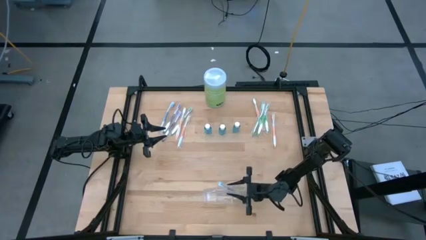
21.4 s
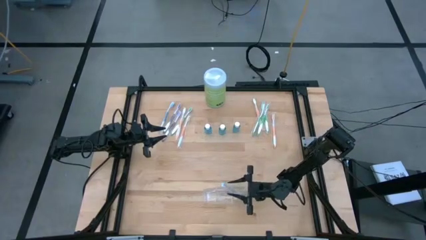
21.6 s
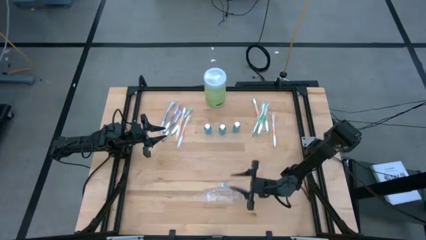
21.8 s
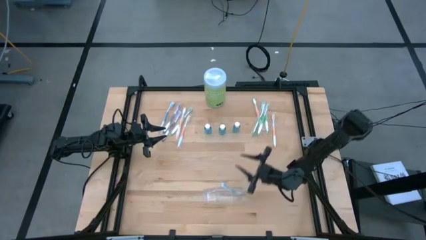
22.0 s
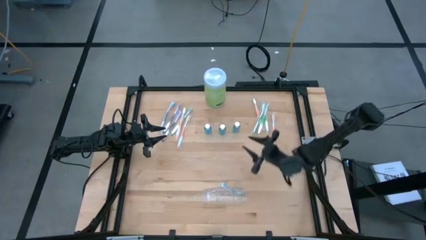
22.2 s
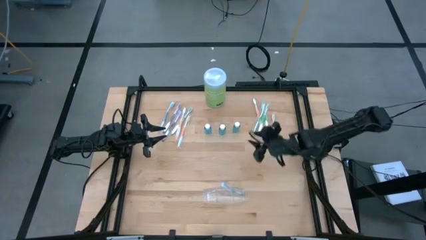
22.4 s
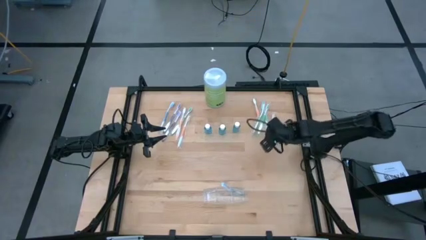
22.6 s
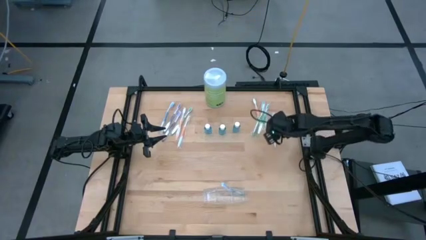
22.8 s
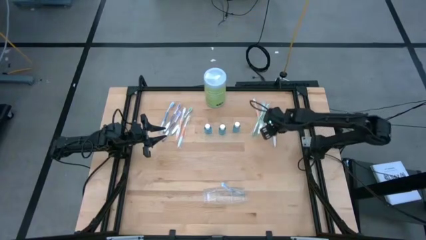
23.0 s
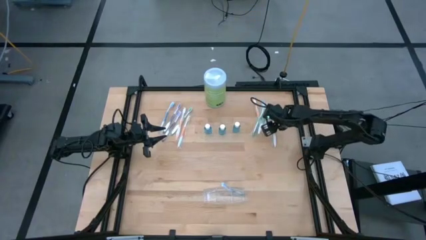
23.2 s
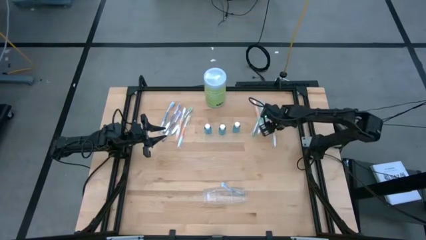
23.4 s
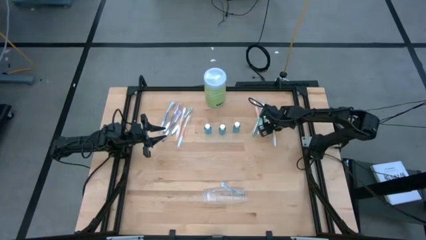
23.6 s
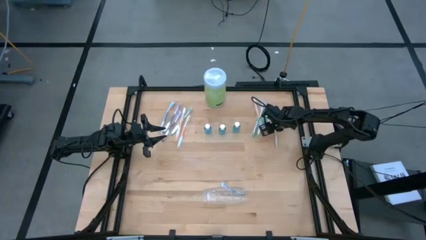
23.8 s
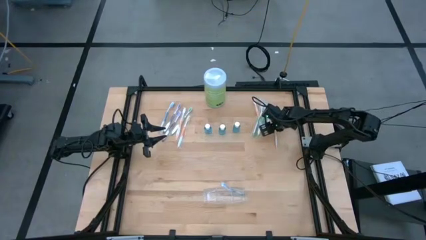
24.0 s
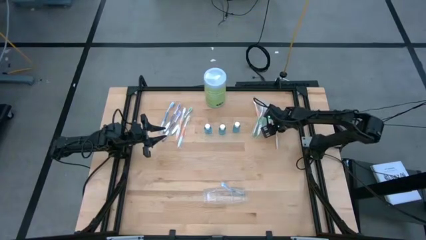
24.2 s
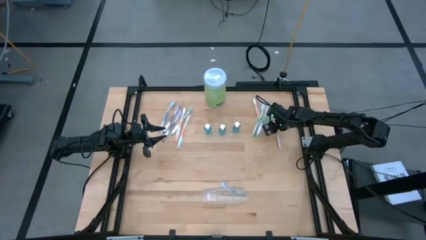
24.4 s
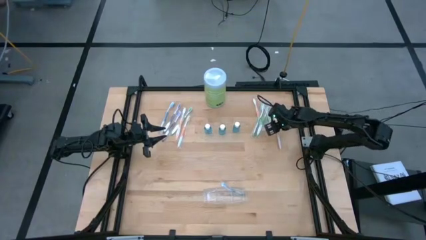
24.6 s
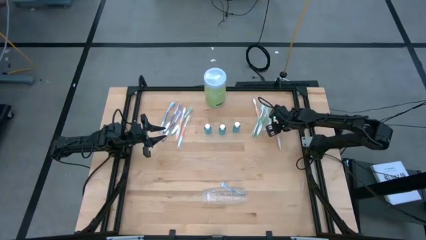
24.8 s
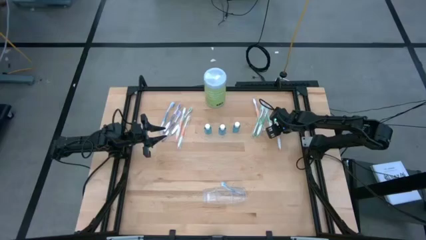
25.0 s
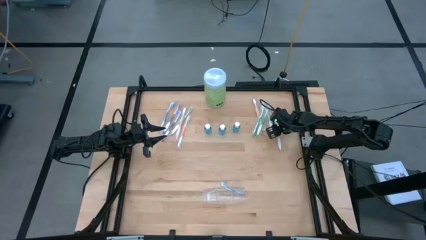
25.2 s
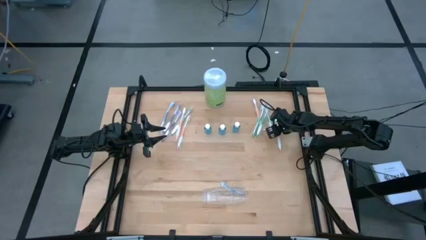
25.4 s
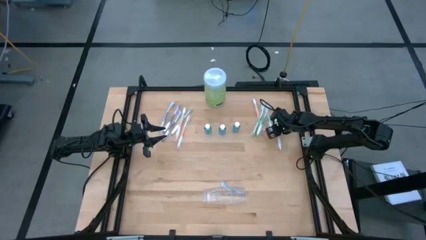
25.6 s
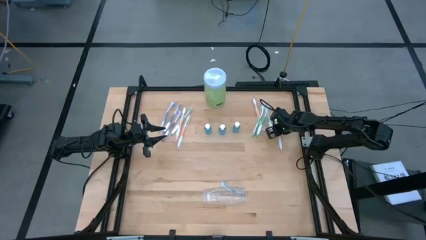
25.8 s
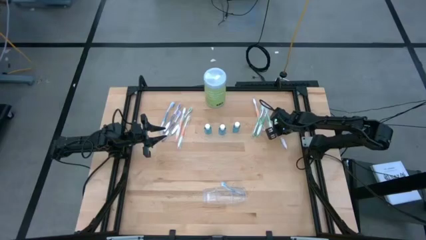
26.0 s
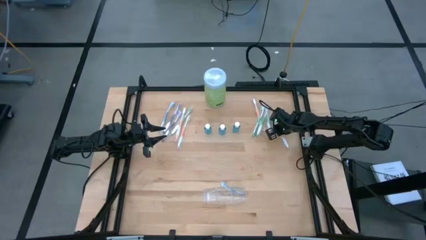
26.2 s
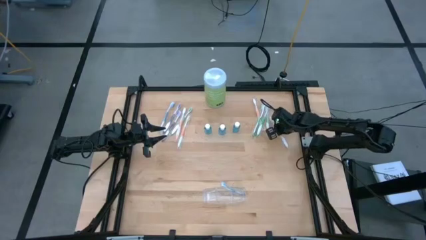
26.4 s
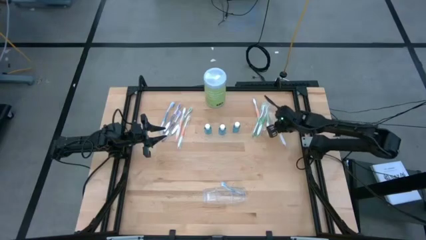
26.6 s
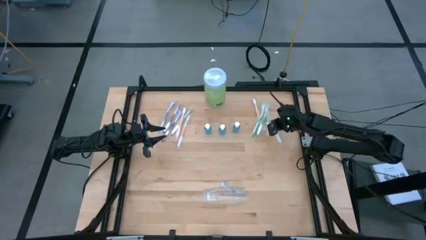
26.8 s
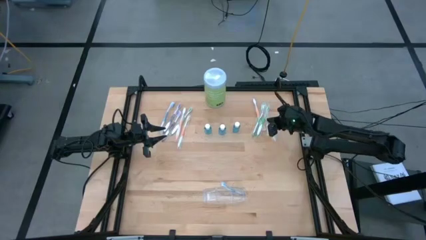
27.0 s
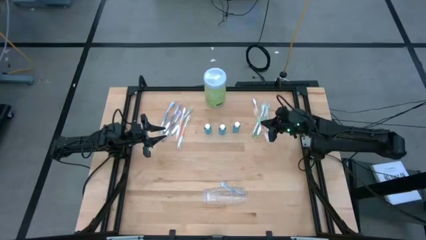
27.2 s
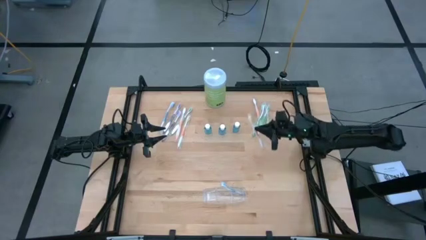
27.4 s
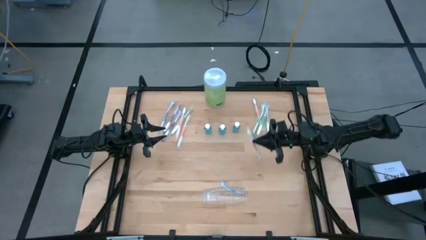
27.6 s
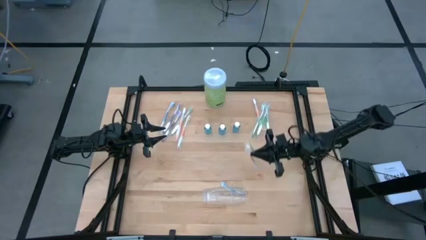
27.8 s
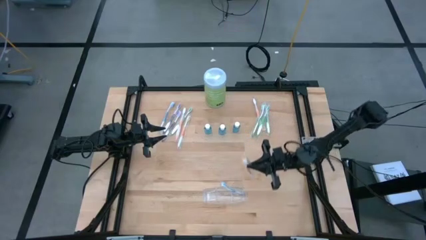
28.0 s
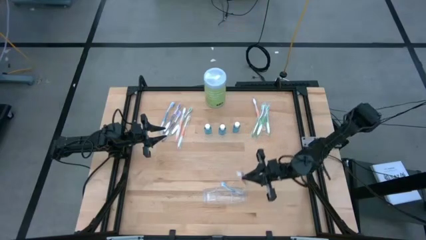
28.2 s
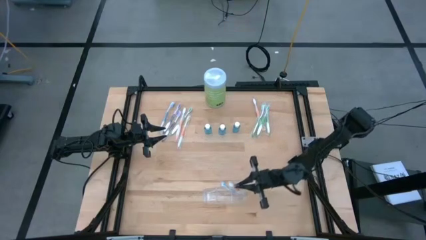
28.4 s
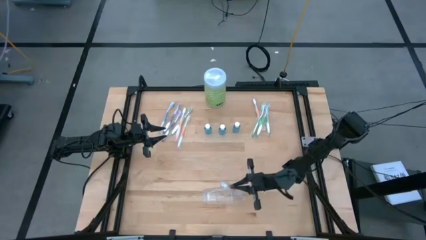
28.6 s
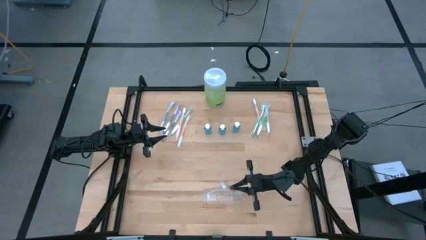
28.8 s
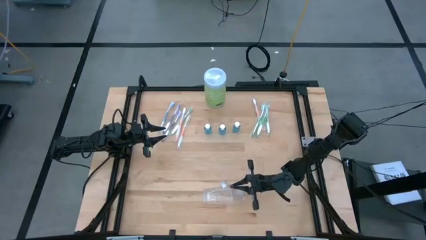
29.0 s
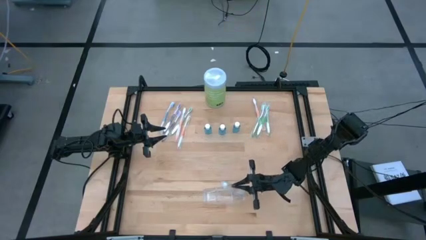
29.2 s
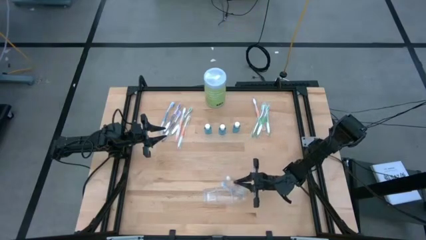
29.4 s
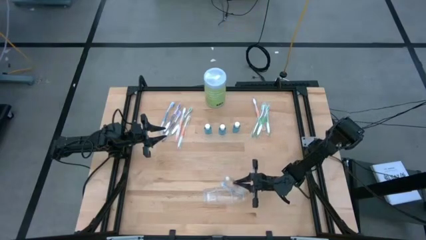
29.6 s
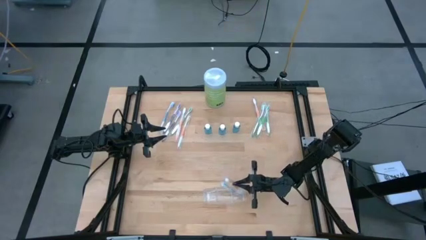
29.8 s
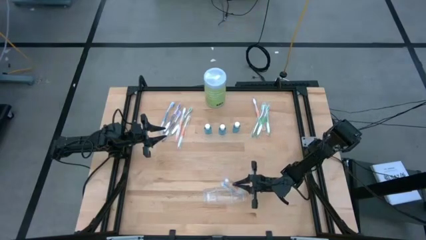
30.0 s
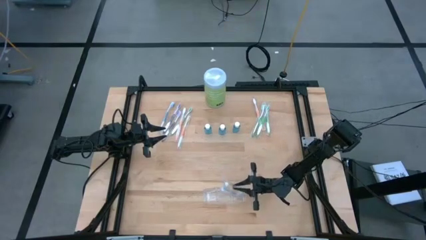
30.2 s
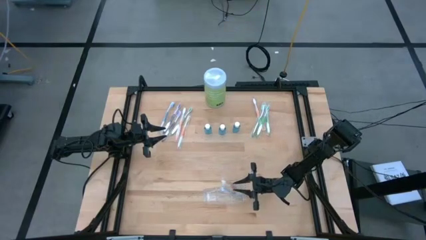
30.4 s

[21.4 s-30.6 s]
Task: Pick & Place toothbrushing station
Put the orange toothbrush into the transparent organizer

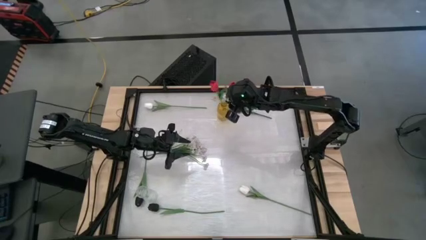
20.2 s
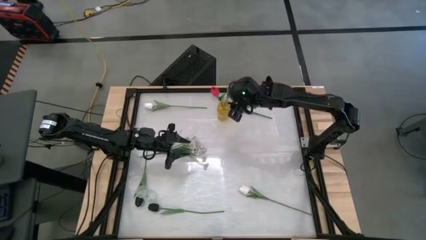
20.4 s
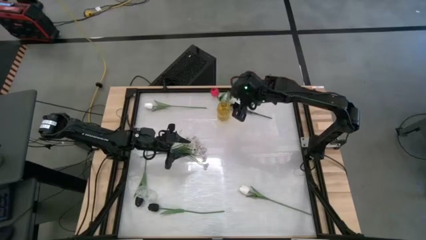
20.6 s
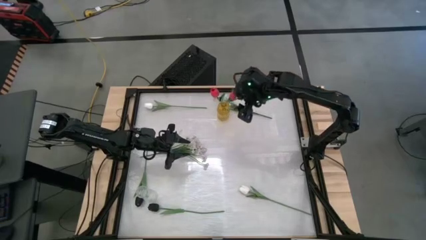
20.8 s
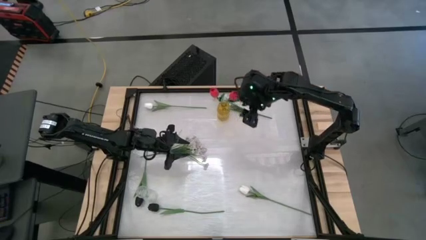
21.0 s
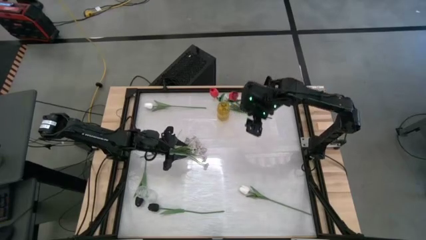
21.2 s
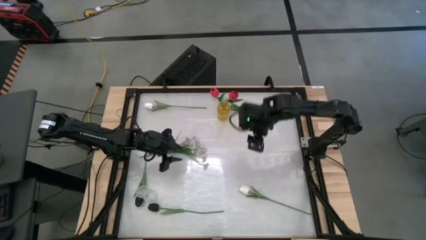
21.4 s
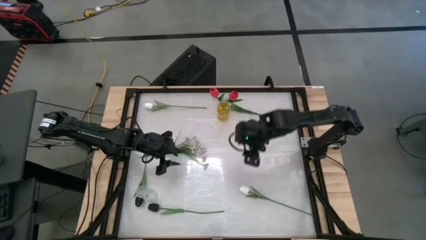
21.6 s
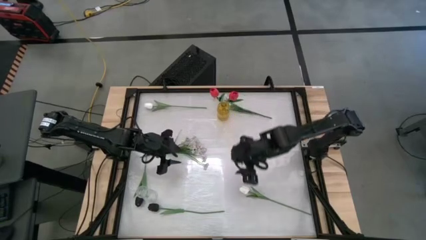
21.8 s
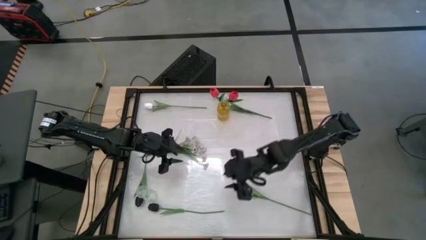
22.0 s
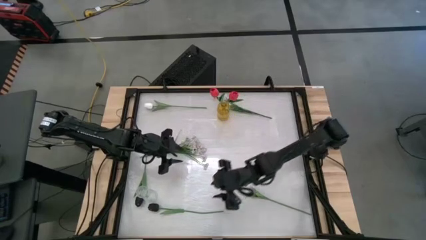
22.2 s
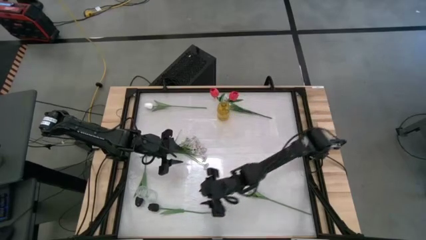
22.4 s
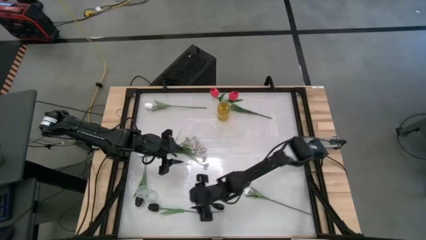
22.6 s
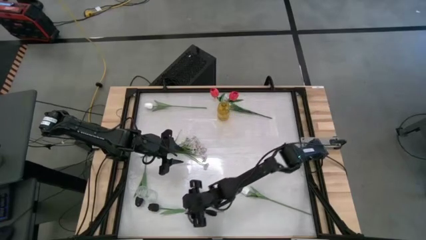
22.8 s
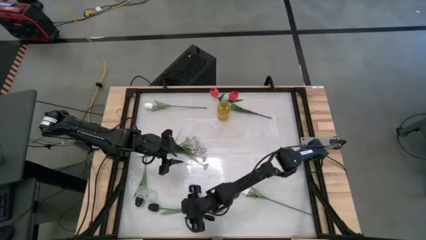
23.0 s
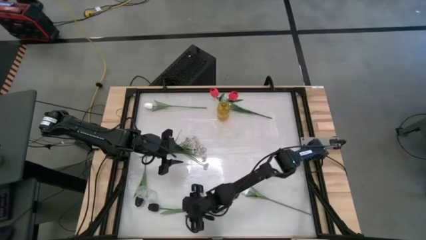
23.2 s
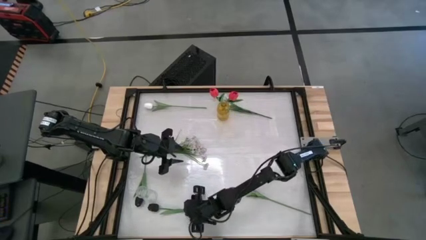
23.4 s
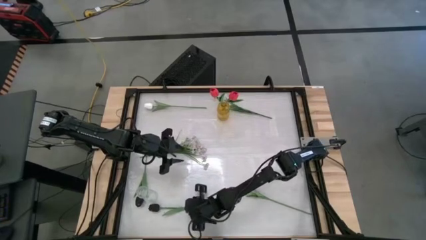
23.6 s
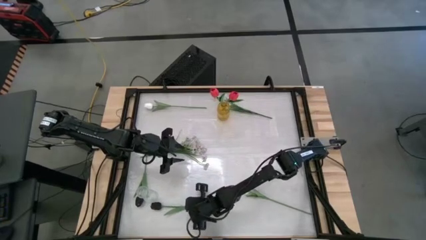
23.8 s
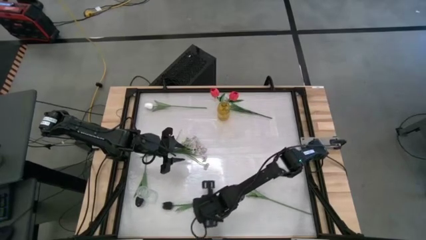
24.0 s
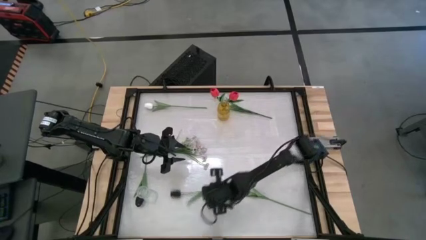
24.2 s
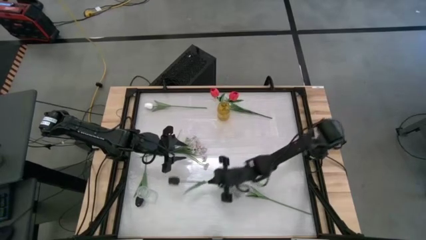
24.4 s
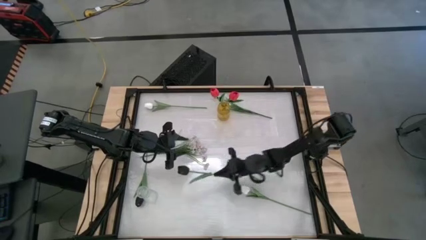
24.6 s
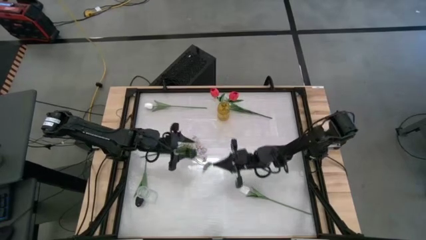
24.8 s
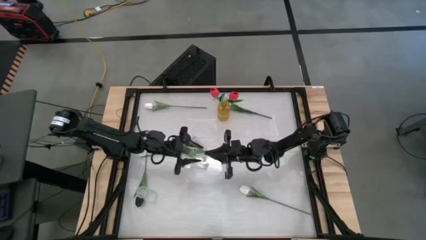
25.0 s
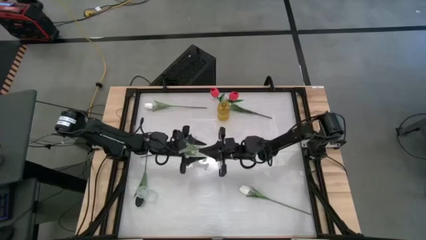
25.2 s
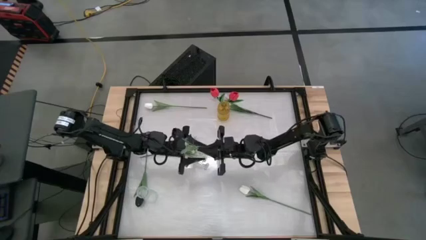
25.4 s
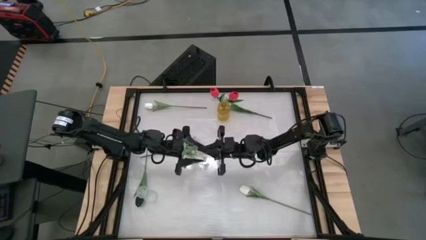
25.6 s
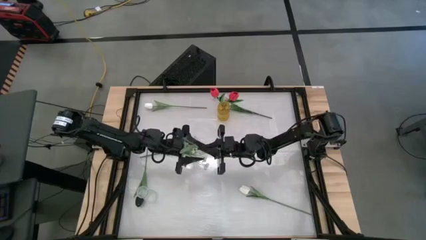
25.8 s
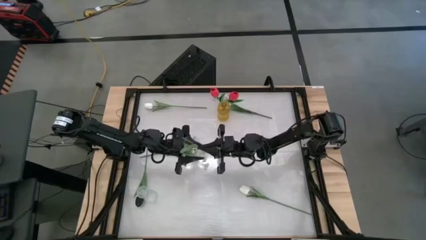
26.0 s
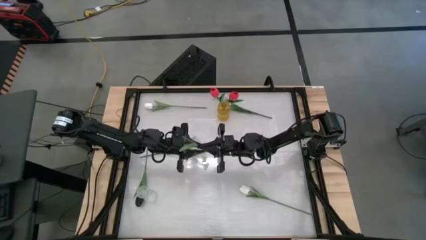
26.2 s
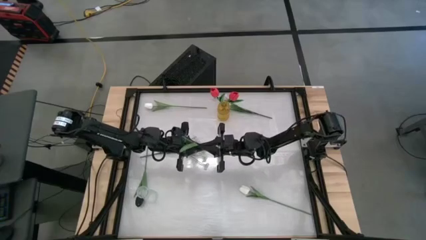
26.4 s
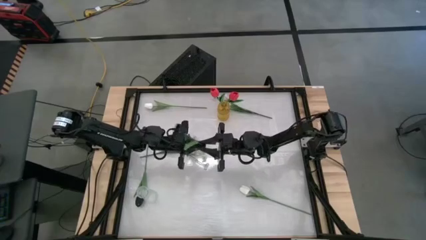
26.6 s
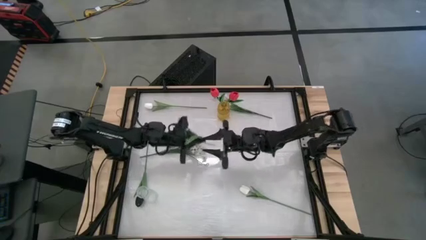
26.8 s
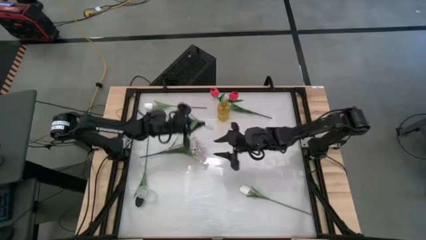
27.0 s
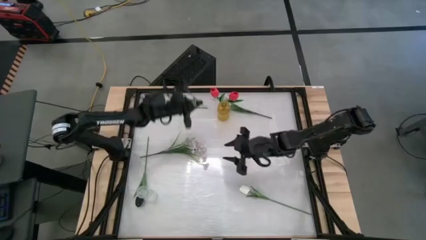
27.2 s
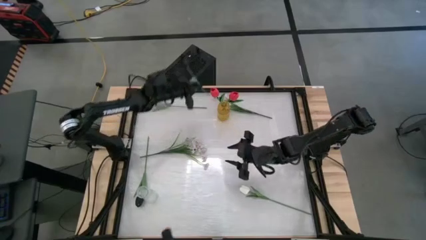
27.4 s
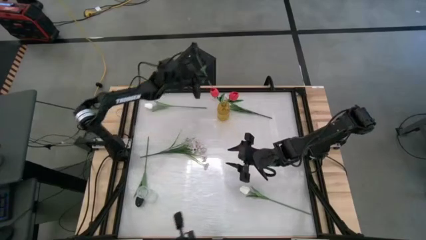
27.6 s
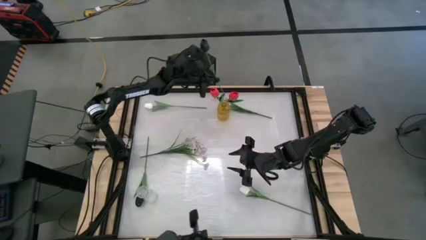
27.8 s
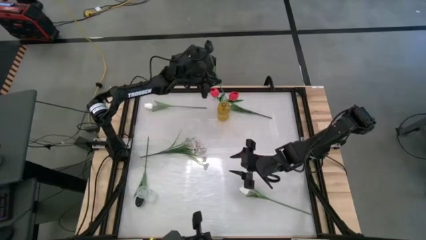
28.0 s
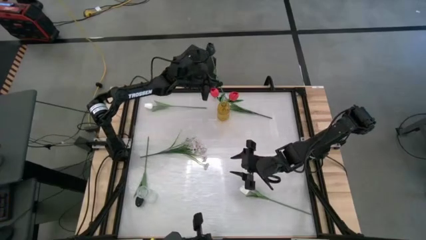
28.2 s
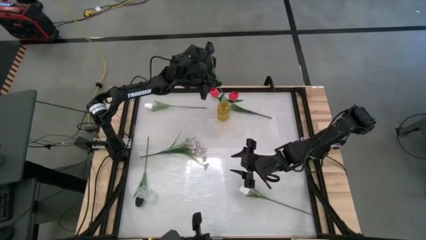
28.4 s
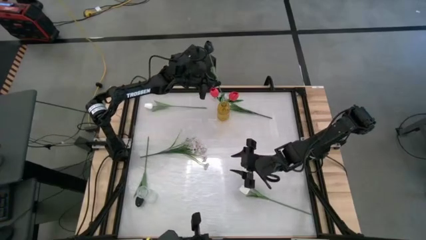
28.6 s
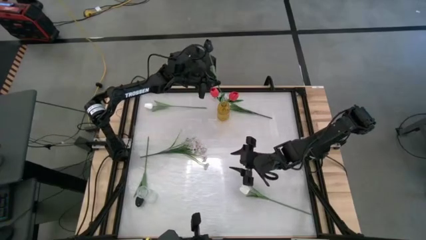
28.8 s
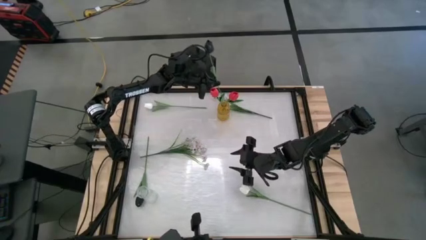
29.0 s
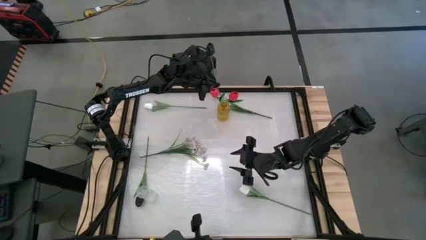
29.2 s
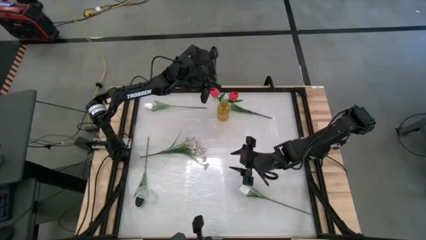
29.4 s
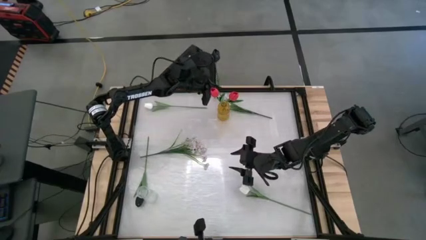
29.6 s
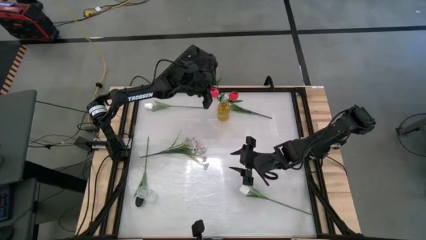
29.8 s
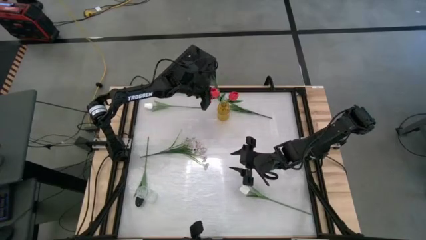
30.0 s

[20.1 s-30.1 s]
Task: Sort flowers into vase by color
Put the bottom black tulip into the yellow vase
